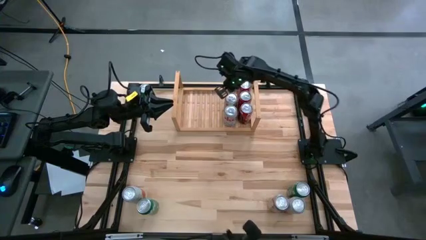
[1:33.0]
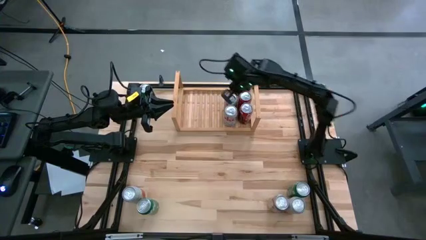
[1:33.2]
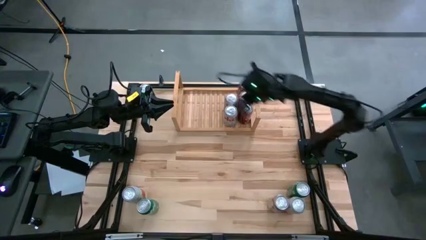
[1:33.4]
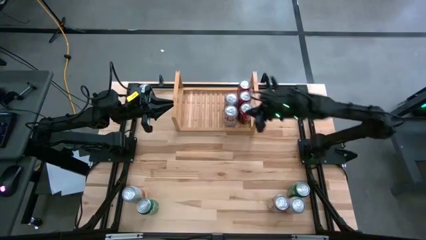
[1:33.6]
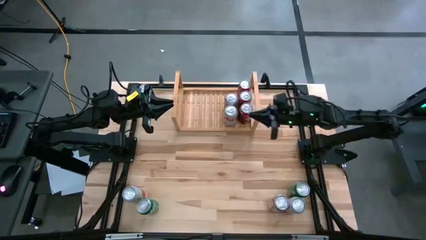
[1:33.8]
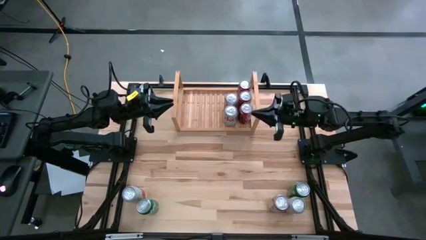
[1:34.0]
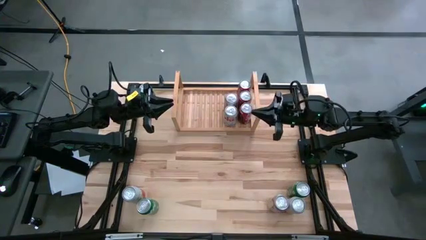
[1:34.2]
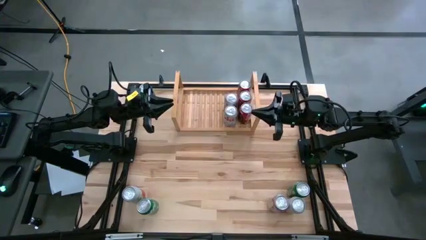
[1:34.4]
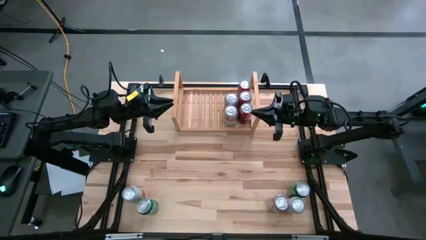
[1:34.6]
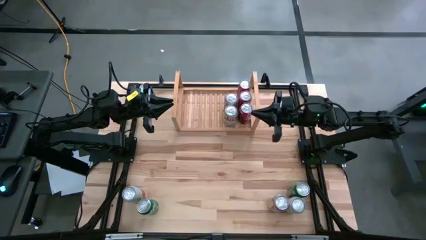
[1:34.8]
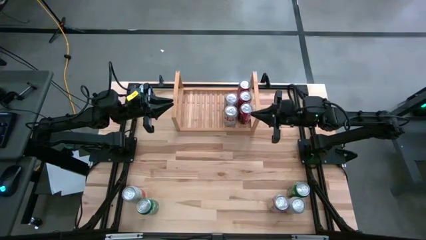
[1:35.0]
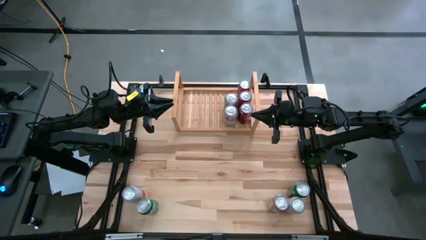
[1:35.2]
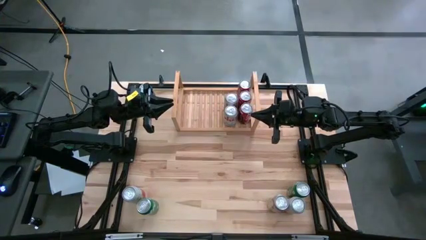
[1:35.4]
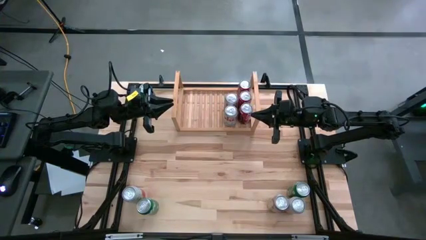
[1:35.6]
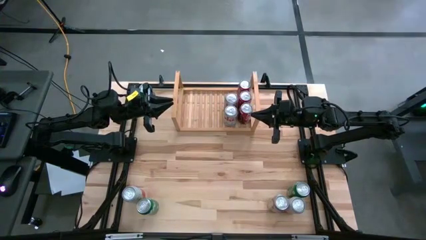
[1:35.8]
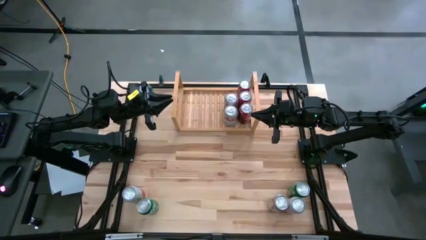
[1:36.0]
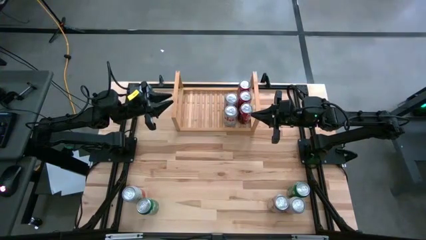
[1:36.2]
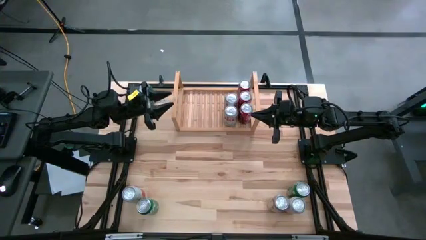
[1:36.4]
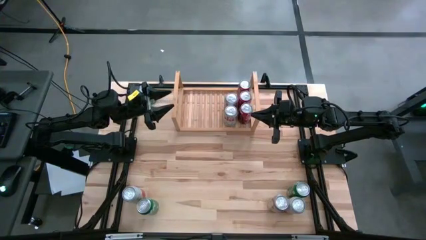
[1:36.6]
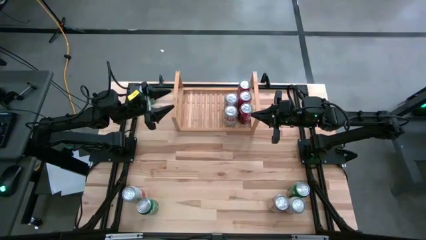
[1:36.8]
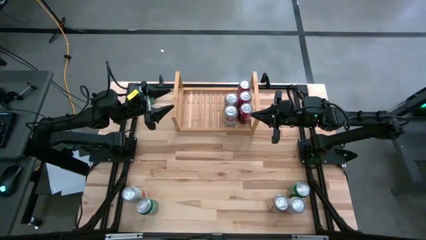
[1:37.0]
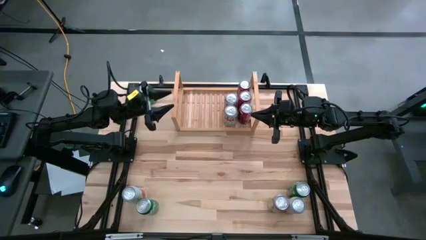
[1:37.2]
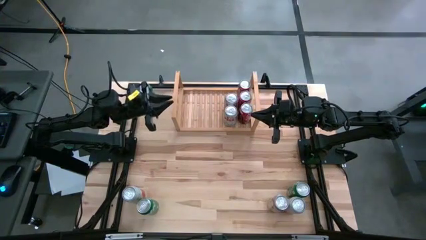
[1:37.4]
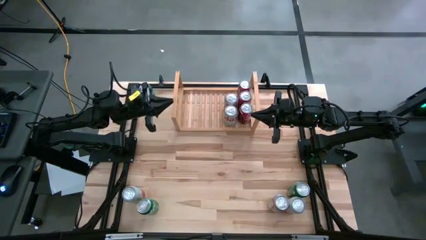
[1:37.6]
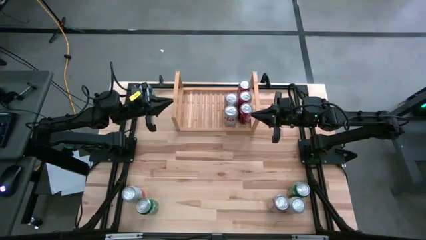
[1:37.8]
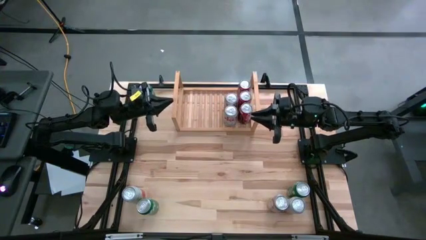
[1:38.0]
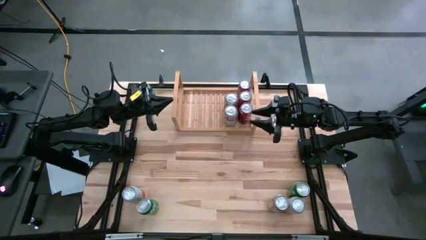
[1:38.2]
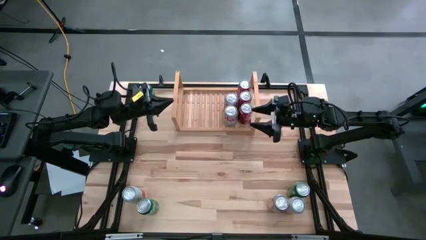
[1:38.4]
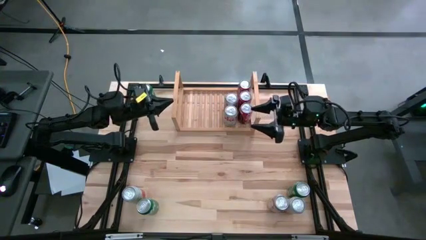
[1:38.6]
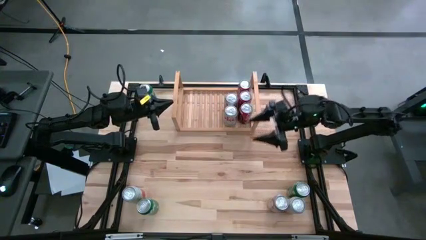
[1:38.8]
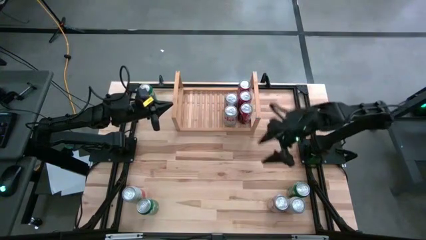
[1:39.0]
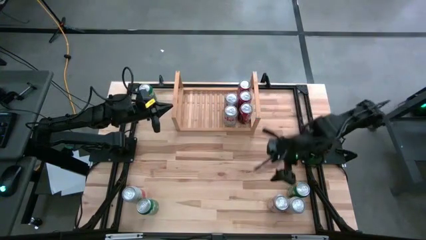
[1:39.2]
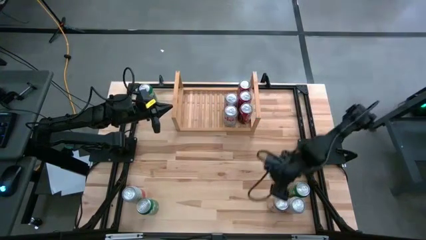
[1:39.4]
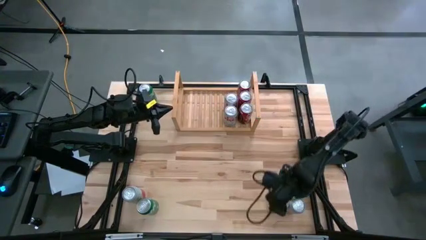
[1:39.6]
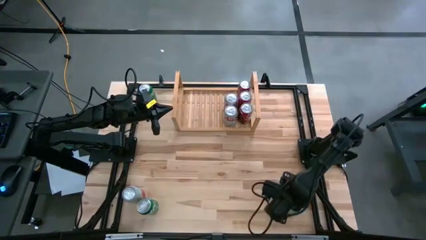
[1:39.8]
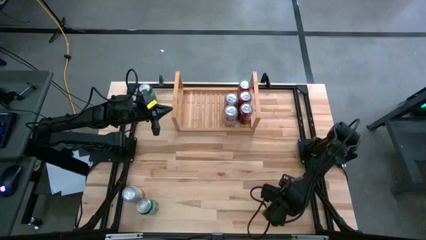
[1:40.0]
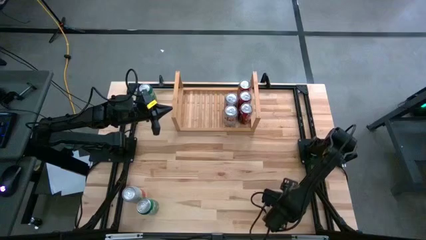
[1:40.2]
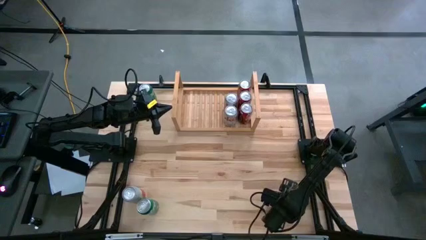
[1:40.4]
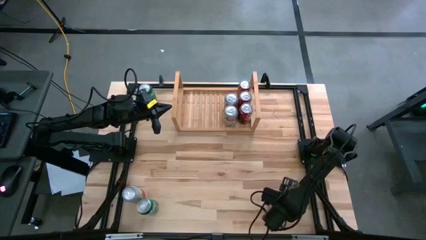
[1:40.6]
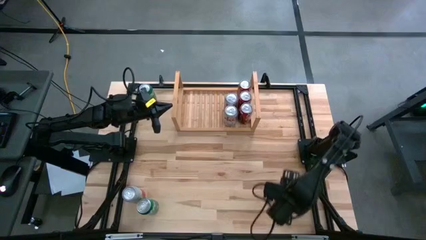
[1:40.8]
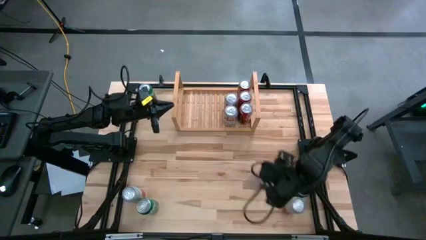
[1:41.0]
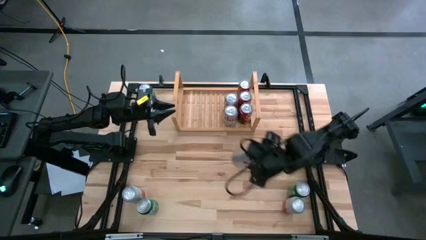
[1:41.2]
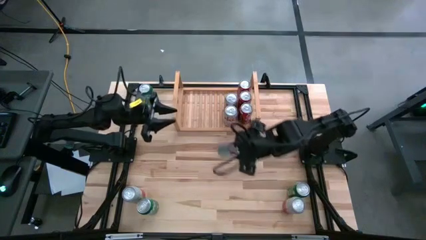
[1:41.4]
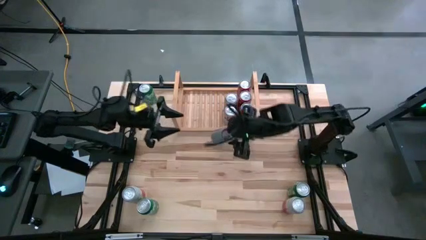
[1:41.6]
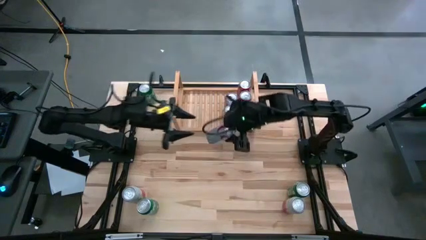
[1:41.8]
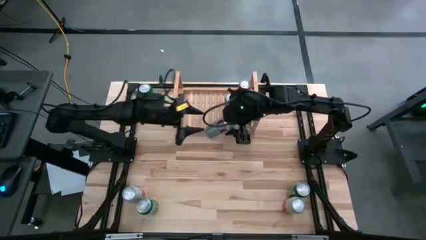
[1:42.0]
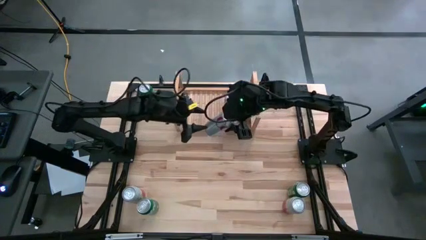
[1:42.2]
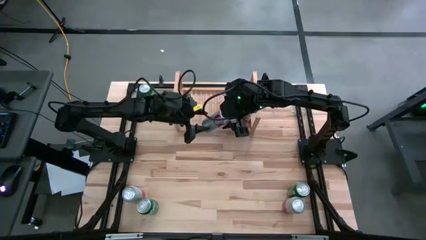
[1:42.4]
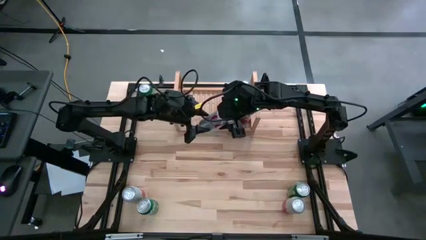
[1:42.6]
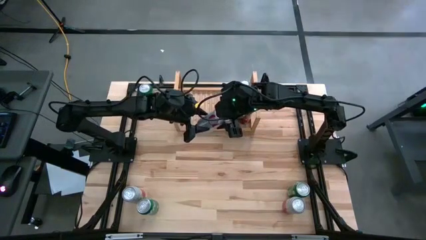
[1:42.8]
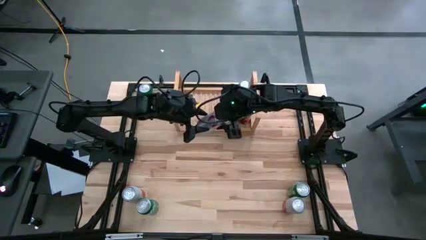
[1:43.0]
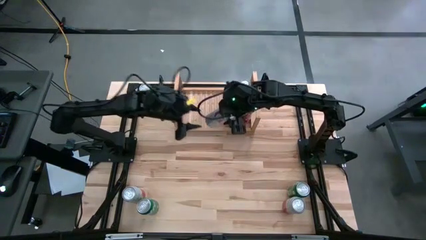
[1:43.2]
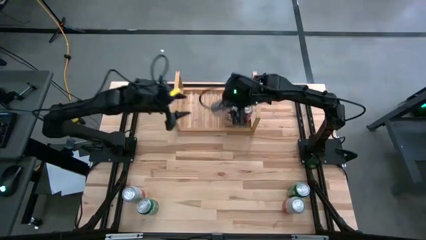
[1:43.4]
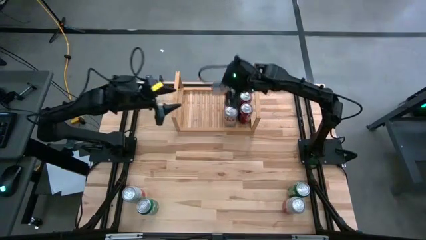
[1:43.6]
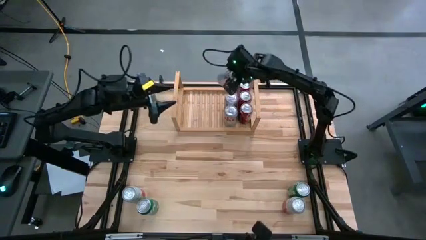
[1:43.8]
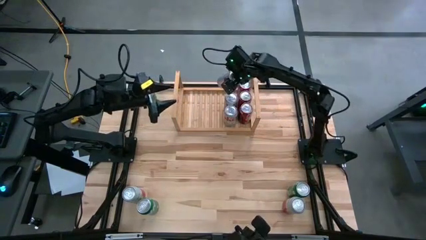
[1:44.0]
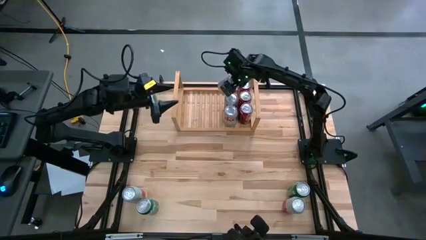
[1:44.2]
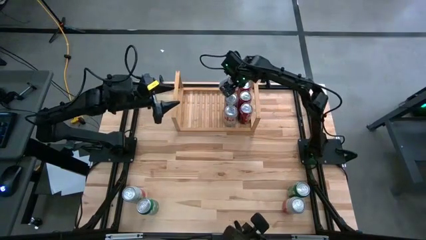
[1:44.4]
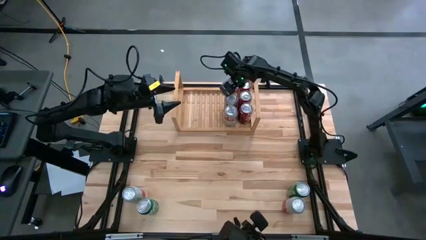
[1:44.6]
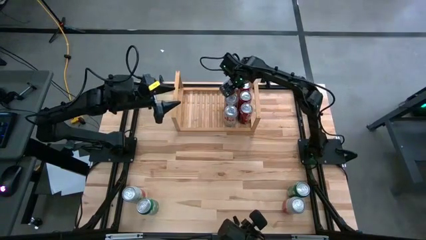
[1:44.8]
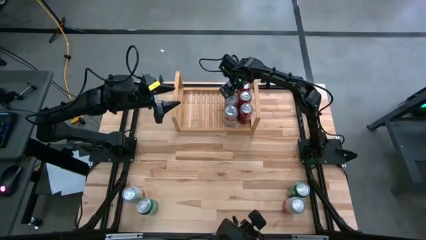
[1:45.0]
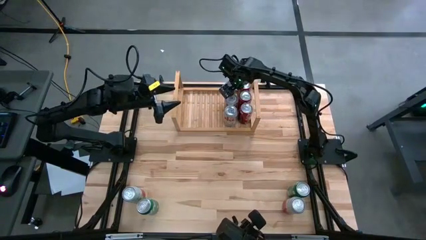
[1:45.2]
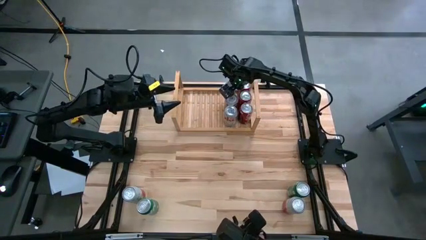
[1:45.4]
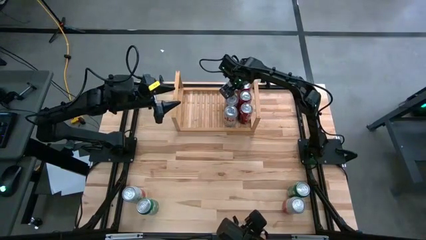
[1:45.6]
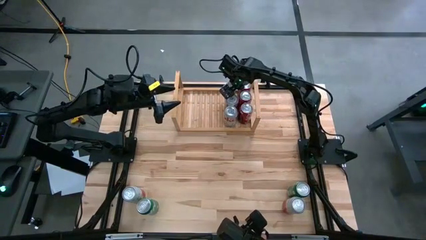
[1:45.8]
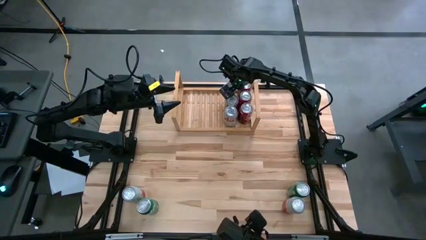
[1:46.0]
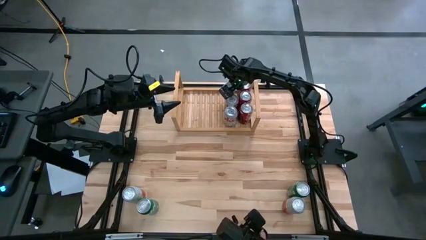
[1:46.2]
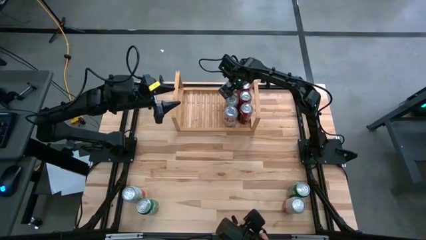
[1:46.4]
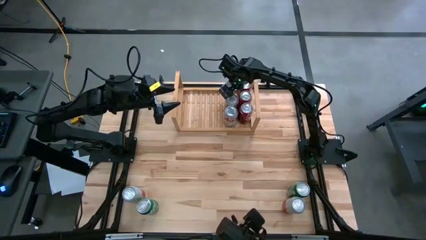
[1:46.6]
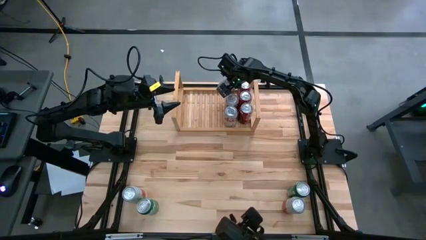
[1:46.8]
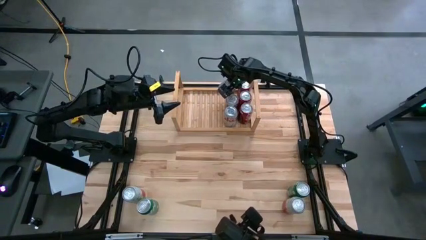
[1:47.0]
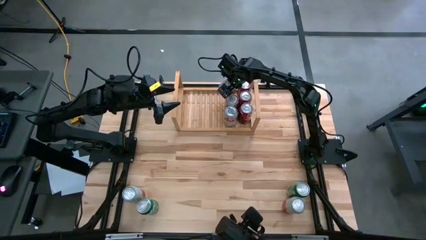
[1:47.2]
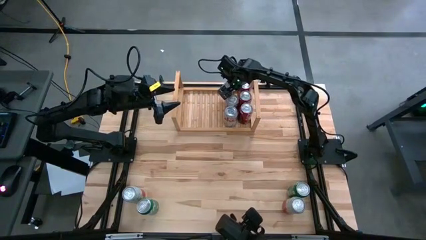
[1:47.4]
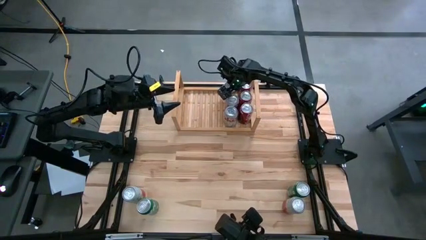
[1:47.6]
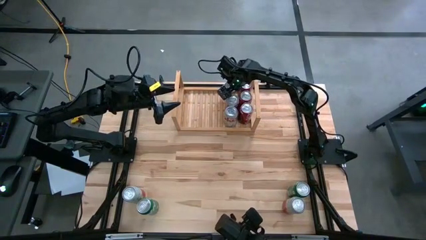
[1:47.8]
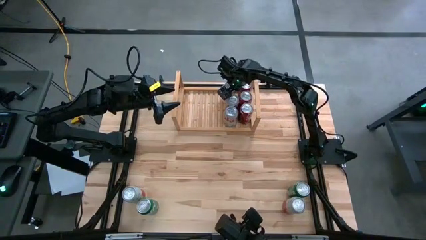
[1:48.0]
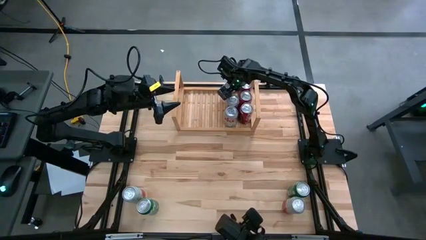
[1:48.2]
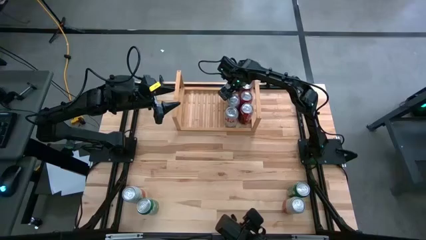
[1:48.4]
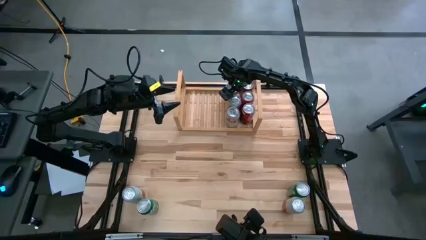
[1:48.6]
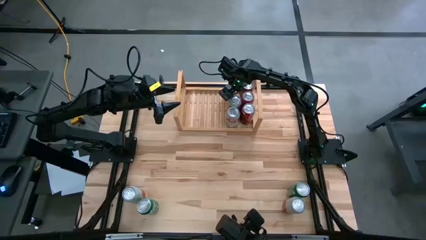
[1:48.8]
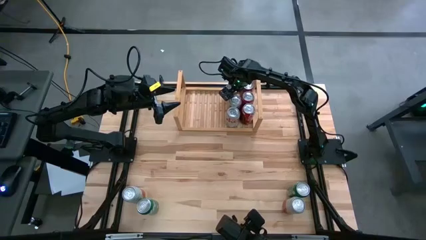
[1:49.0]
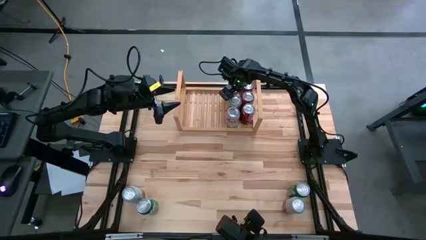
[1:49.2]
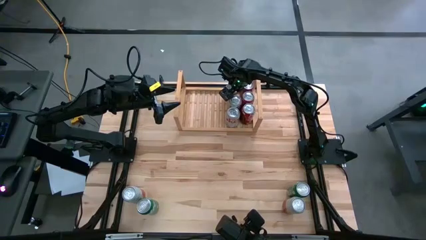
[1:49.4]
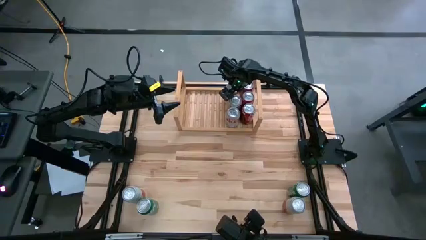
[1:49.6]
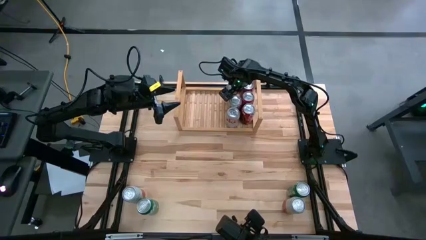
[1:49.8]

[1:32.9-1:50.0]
Task: Place canned beverage on shelf
Put the red-silver soda can aligned with the other red-silver soda can on the shelf
